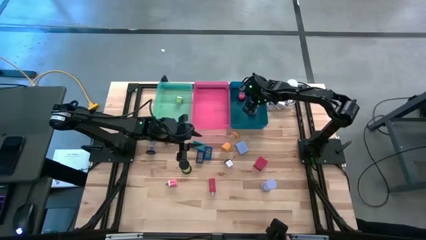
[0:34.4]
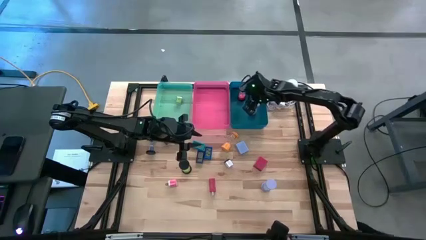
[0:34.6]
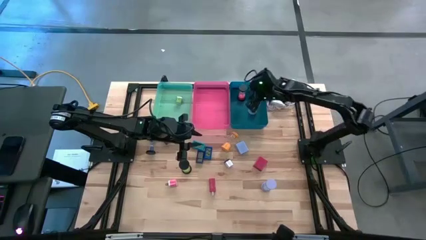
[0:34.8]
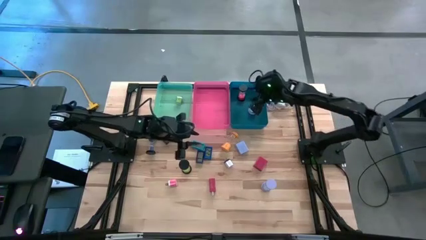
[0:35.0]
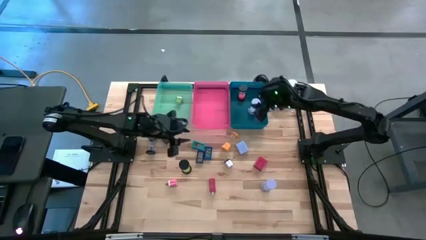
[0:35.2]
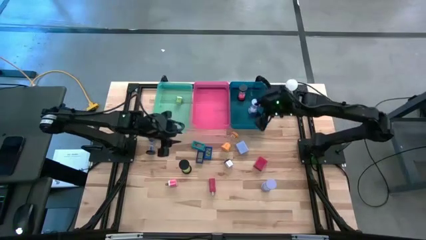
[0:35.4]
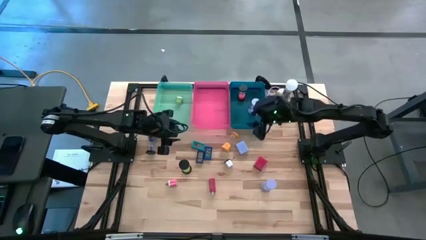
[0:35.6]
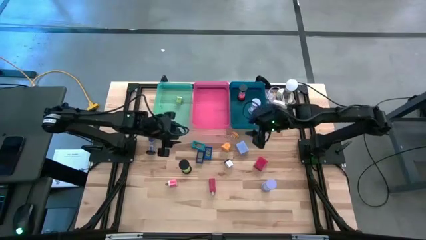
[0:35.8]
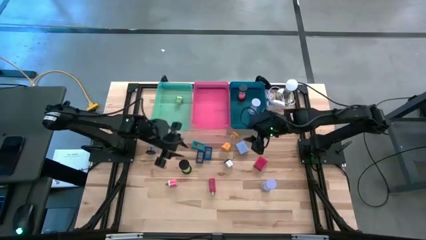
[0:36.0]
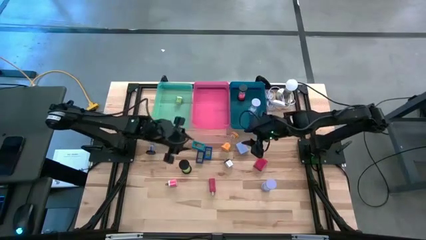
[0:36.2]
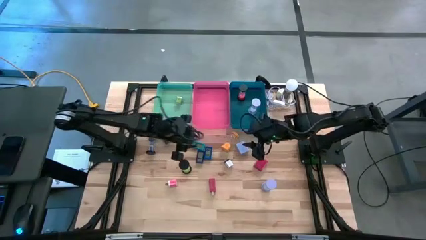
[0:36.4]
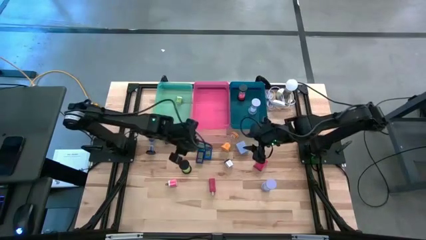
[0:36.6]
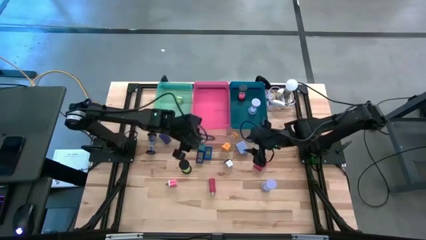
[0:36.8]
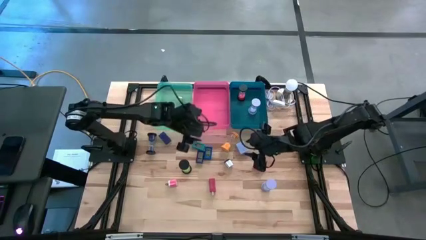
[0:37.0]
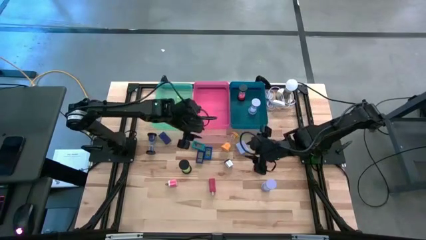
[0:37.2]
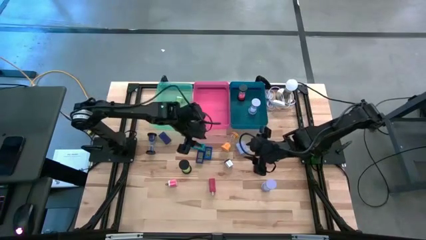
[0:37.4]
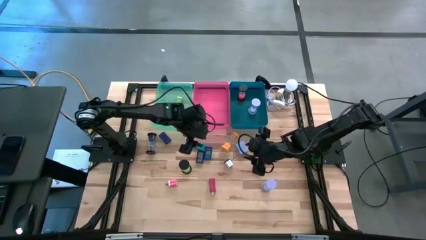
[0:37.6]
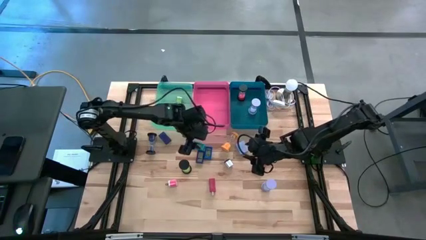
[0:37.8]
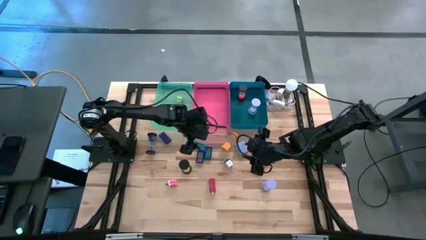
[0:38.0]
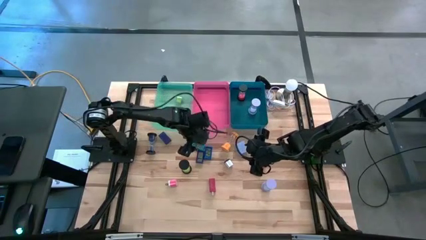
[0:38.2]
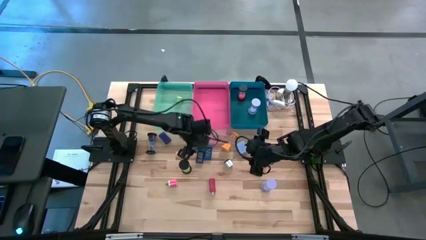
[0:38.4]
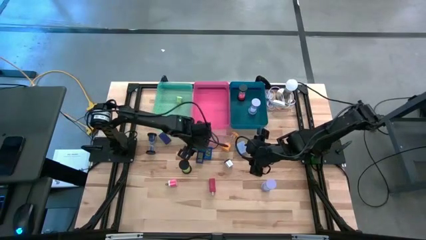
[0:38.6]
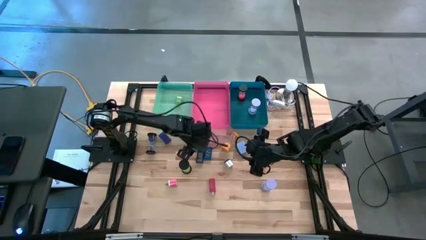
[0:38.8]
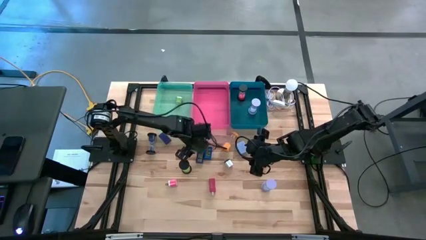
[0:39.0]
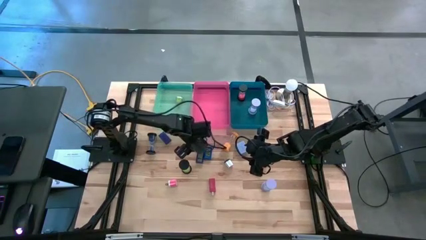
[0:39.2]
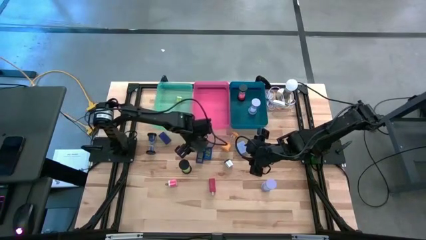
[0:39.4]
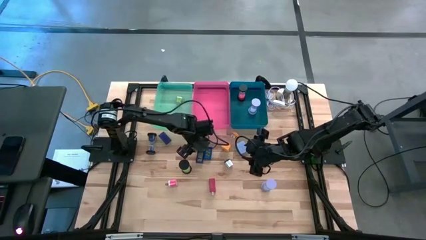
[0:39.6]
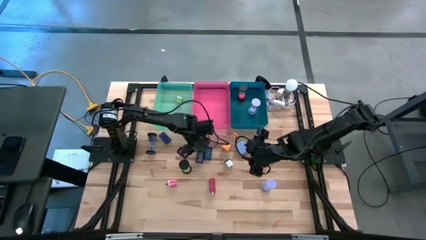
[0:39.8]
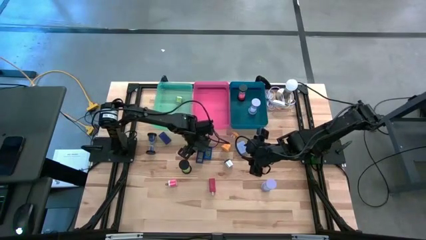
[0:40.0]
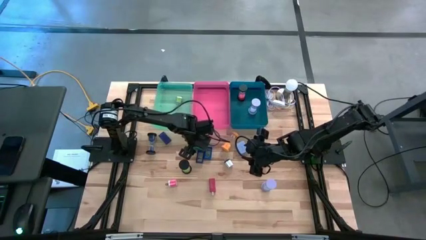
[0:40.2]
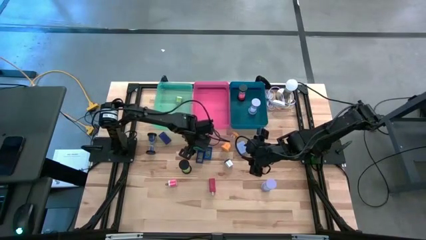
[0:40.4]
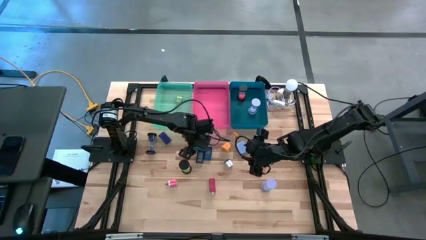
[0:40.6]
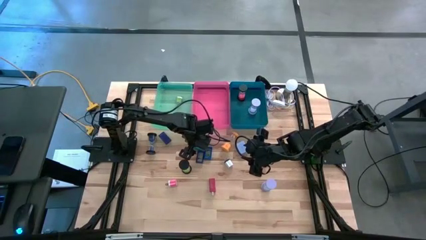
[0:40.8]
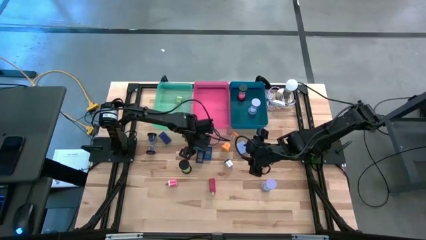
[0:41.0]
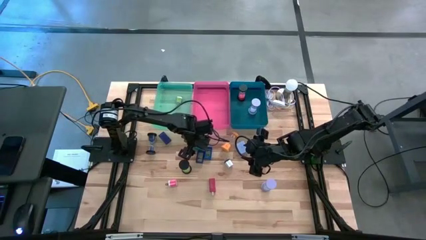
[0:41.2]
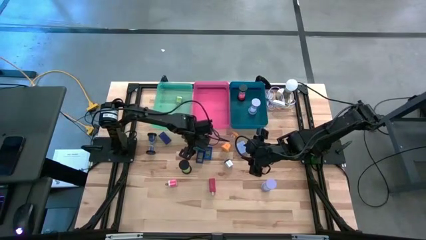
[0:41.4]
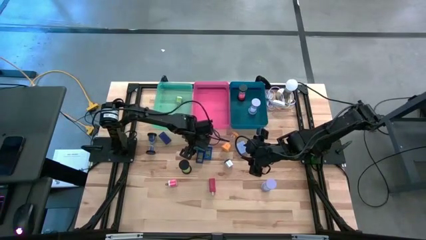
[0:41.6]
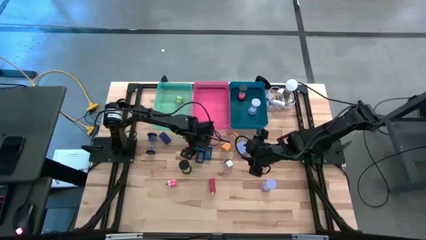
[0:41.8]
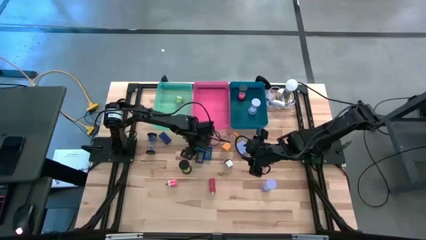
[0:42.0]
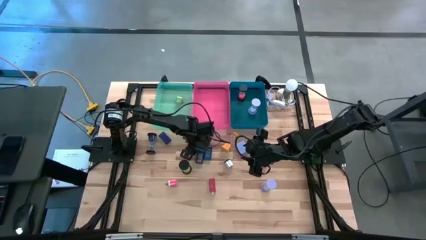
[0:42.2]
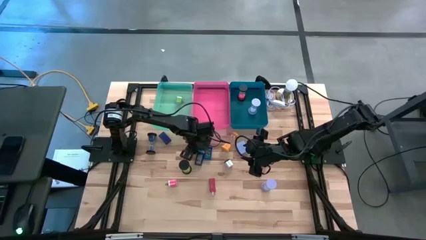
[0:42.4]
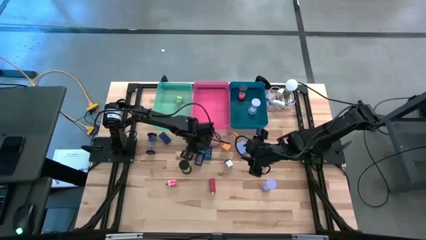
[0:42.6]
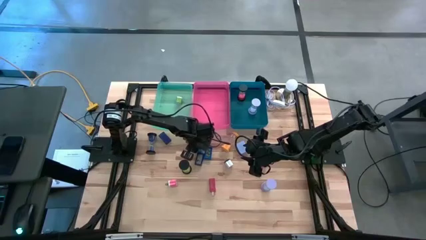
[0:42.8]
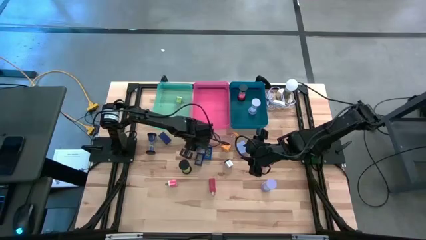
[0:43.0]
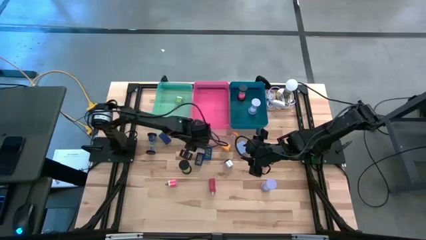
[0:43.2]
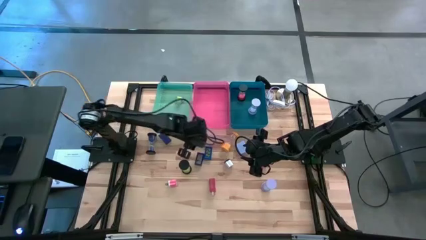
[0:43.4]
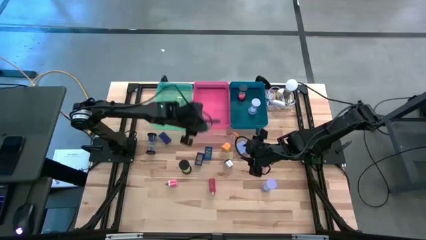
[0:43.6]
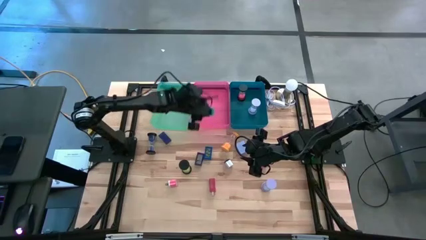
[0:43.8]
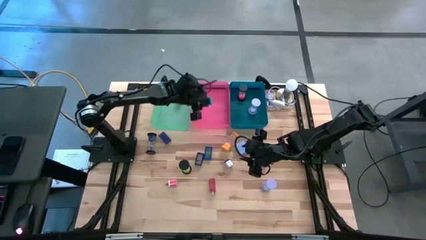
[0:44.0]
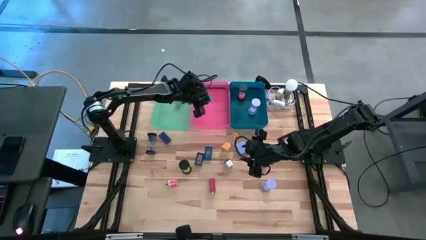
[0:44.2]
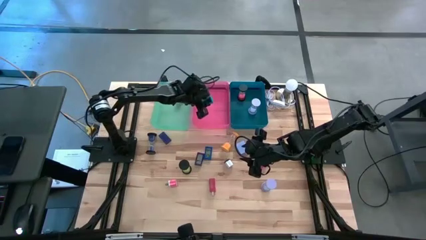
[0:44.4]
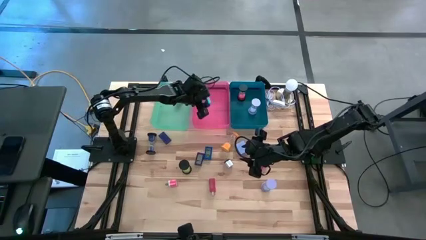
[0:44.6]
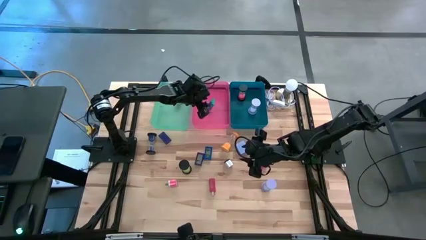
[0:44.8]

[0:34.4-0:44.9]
Task: Pick & Place Office items
Put the light blue digital clock into the pink bin

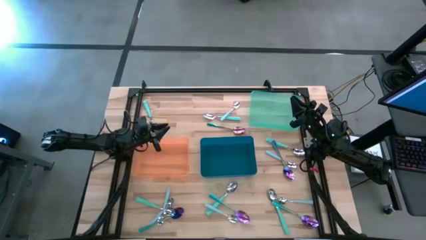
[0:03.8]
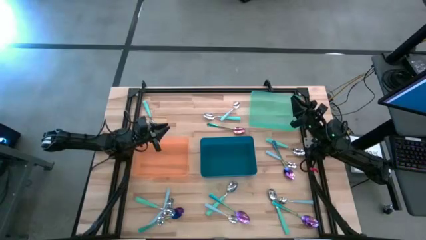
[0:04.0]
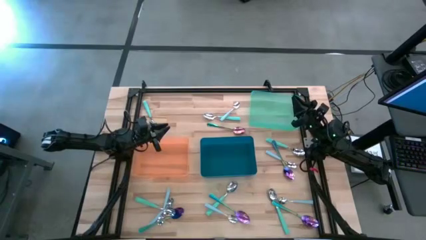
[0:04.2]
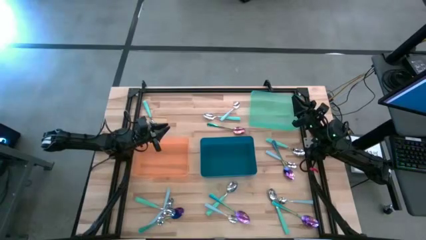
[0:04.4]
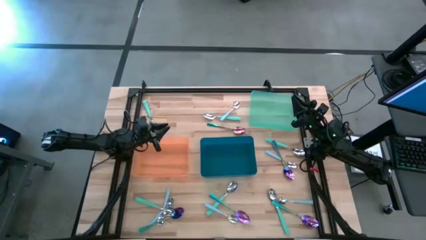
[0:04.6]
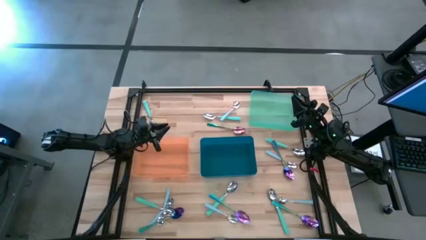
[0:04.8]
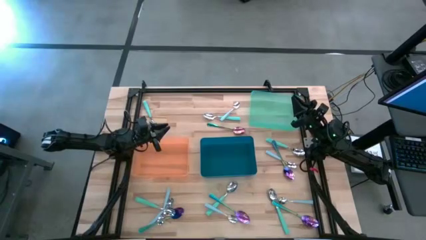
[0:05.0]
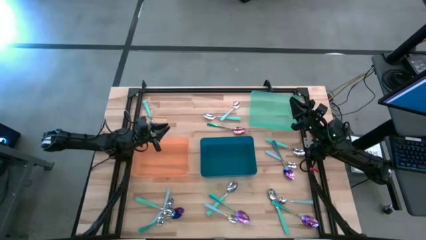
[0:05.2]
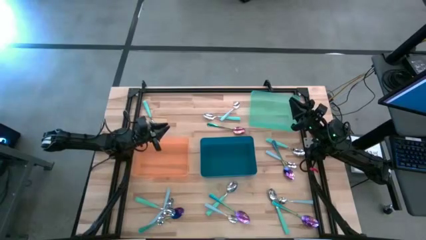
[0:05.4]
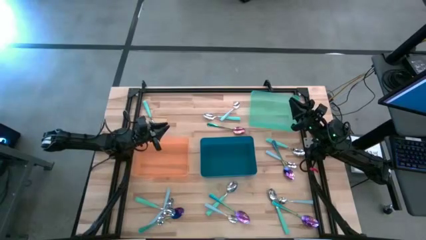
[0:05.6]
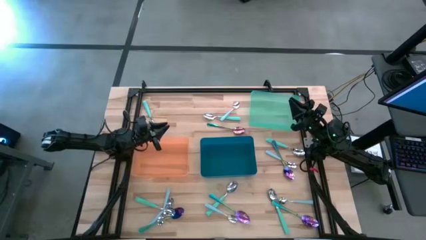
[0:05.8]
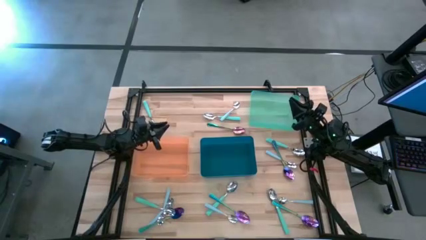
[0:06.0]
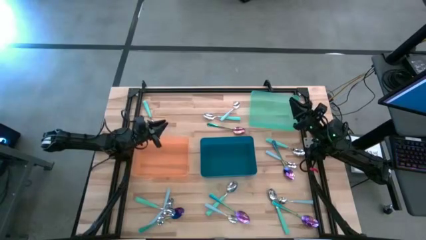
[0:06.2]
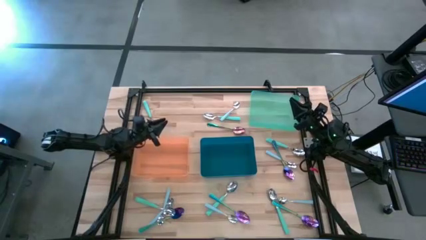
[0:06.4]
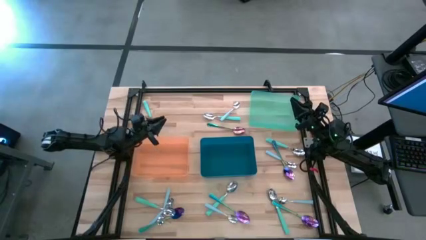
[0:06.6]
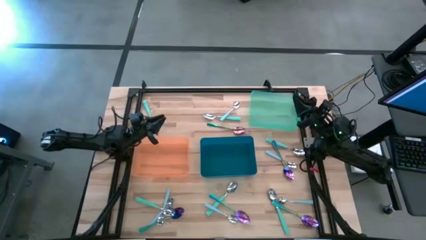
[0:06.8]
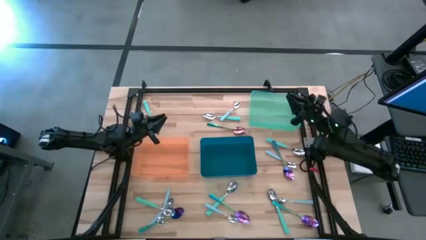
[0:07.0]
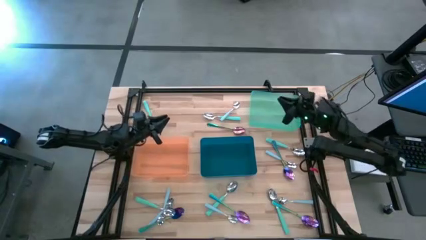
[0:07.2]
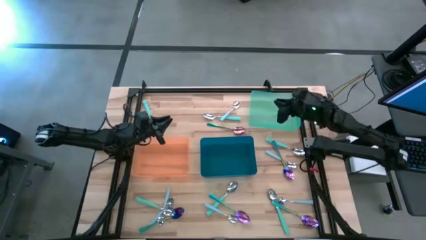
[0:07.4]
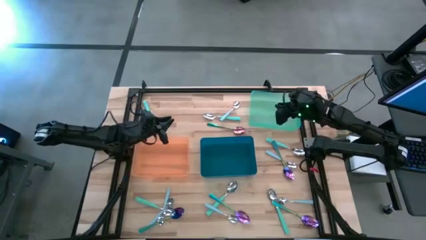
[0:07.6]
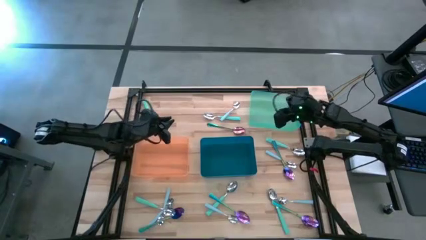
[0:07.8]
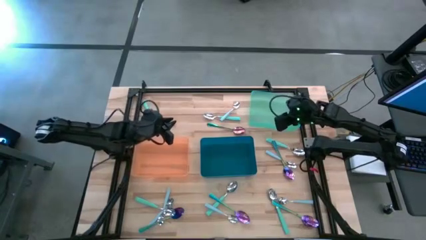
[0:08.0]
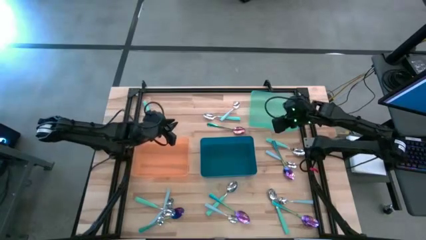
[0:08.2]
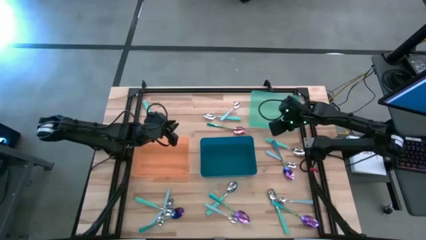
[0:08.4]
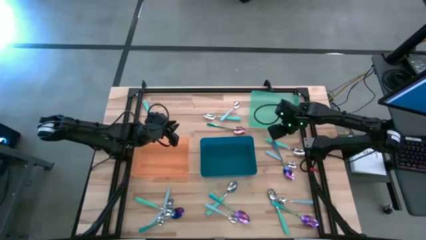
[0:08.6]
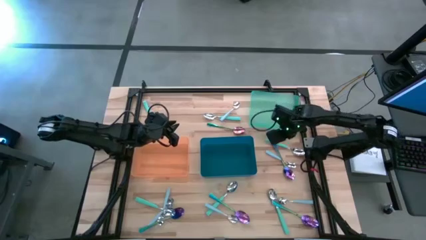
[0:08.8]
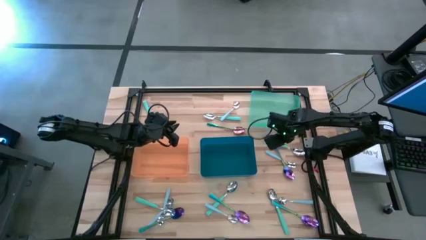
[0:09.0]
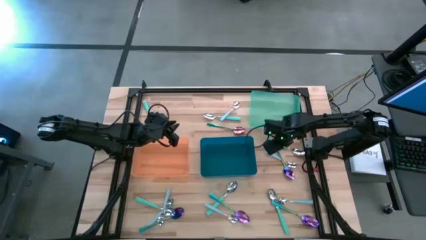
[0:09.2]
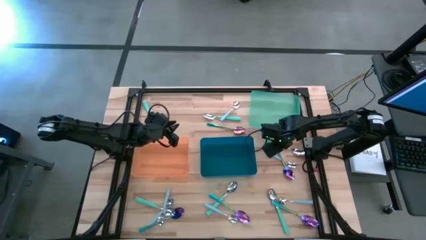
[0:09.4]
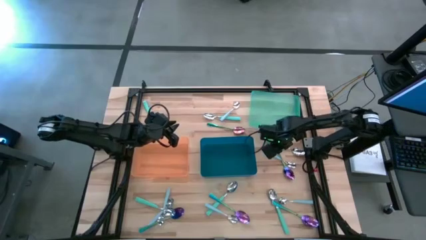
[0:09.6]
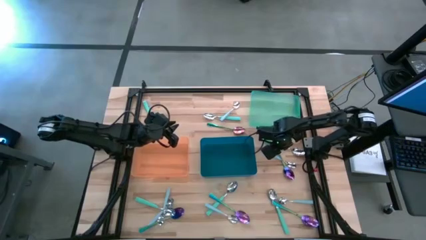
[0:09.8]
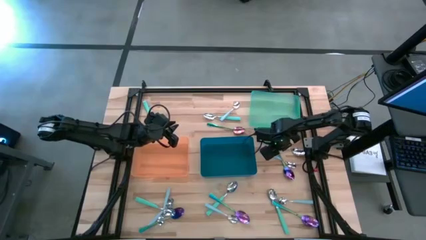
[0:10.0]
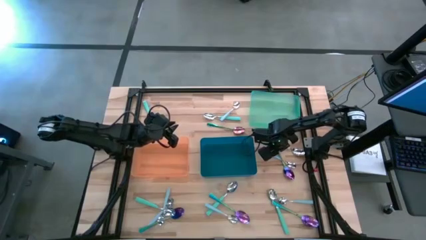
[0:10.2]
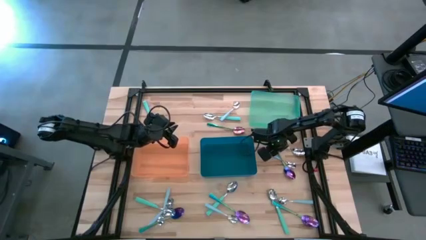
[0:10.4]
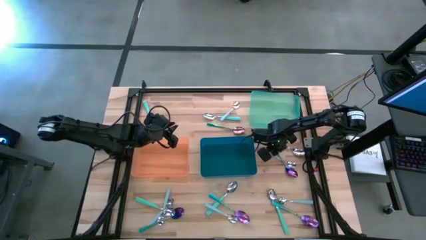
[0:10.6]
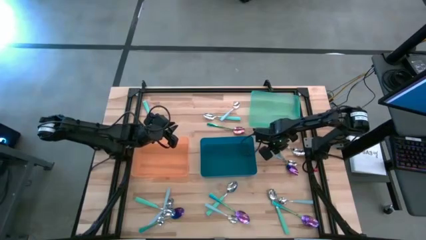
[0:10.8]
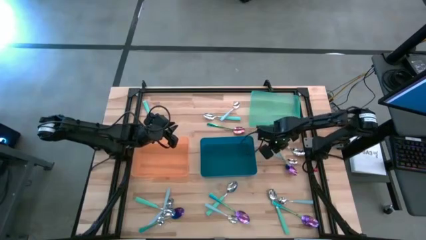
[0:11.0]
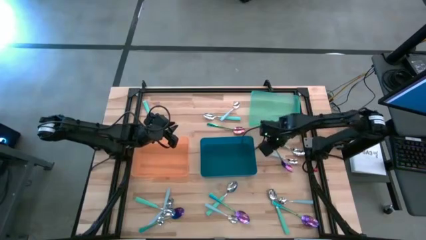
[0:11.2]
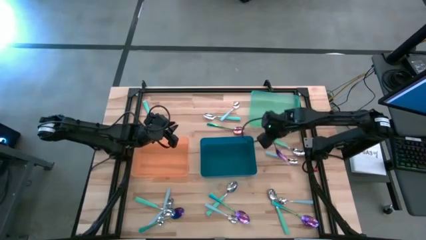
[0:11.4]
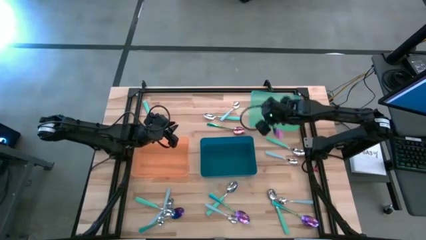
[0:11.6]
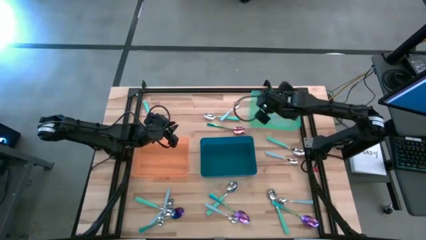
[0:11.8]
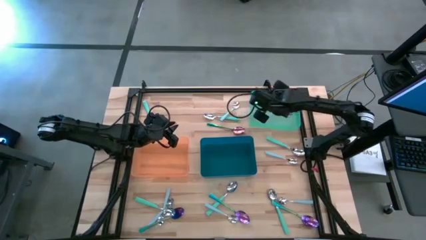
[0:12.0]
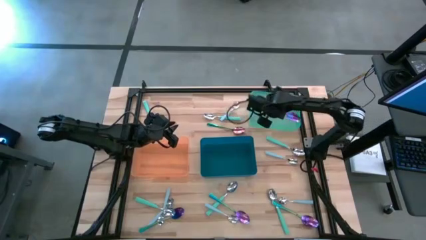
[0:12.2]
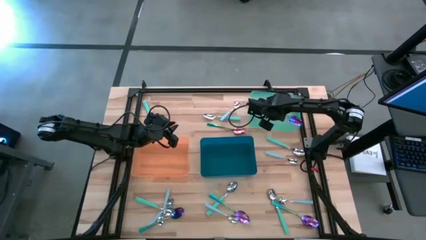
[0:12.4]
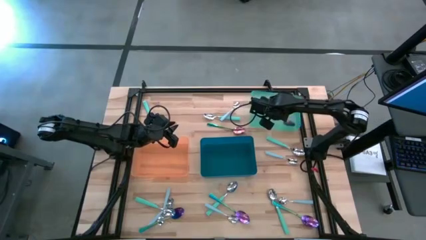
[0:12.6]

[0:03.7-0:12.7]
Task: Sort silverware by color (type)
Put the blue spoon into the green bin
